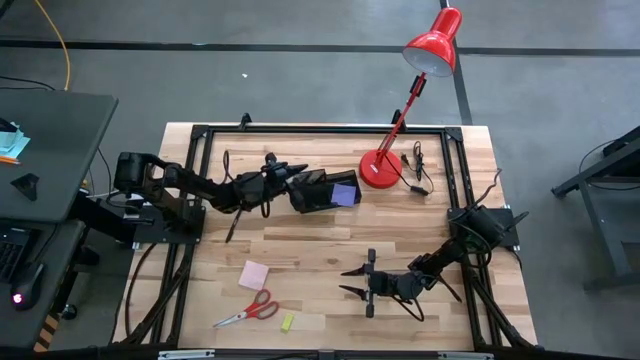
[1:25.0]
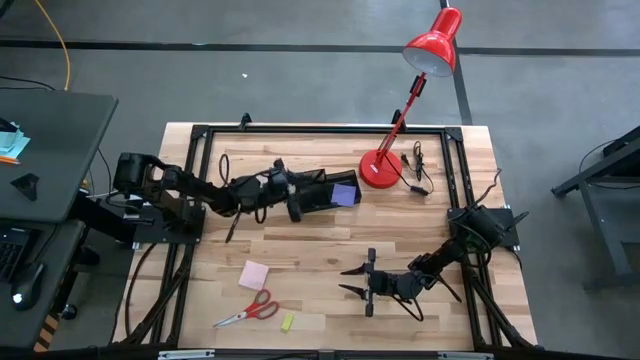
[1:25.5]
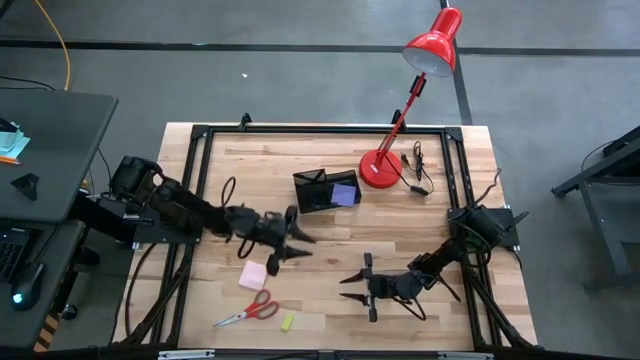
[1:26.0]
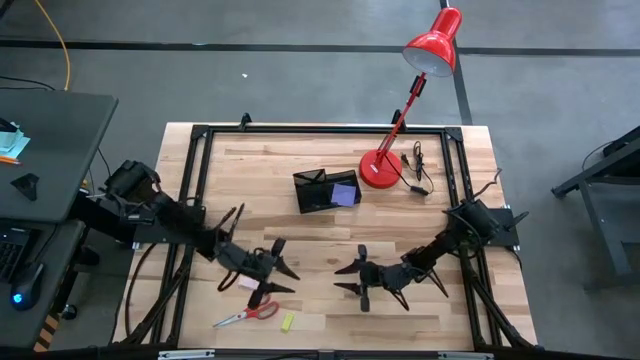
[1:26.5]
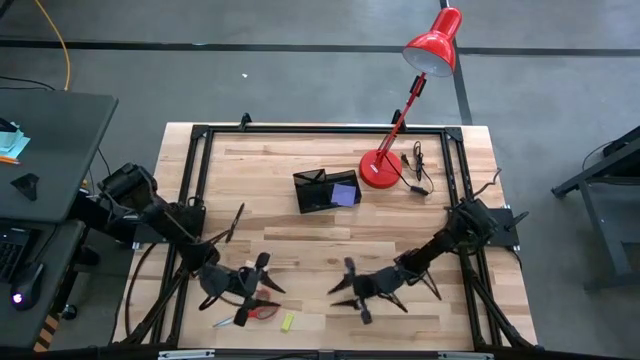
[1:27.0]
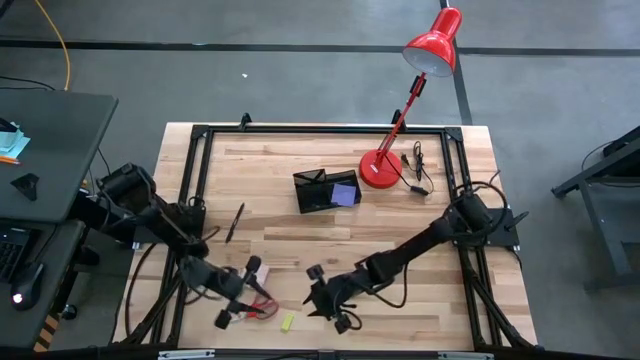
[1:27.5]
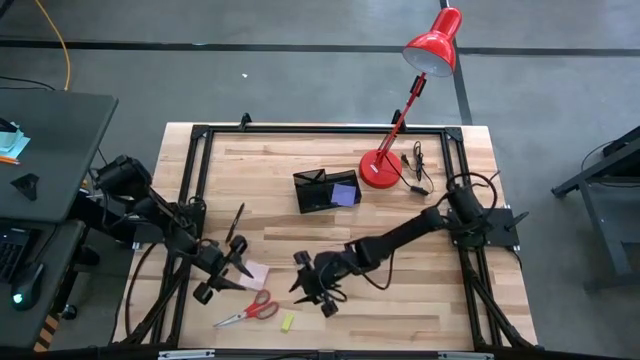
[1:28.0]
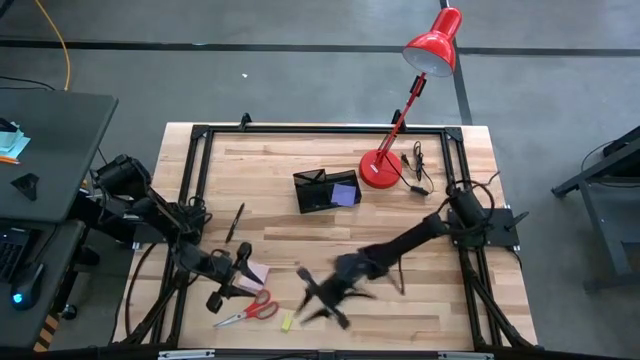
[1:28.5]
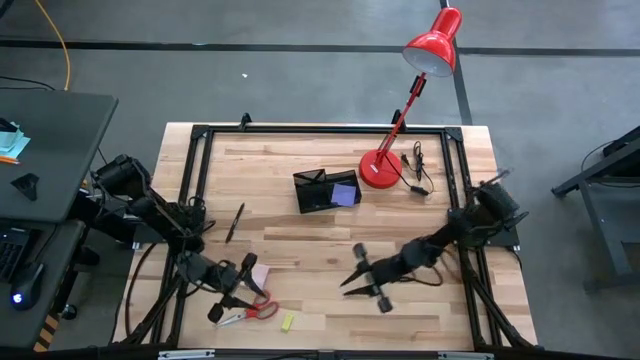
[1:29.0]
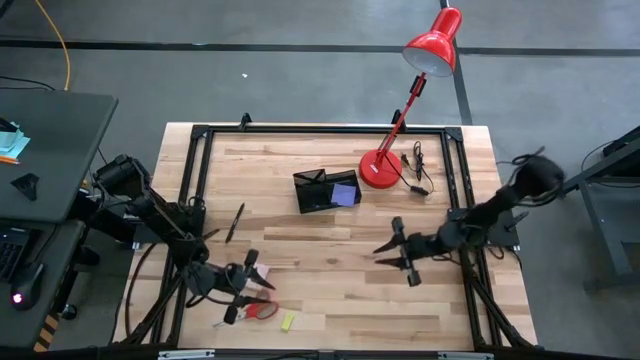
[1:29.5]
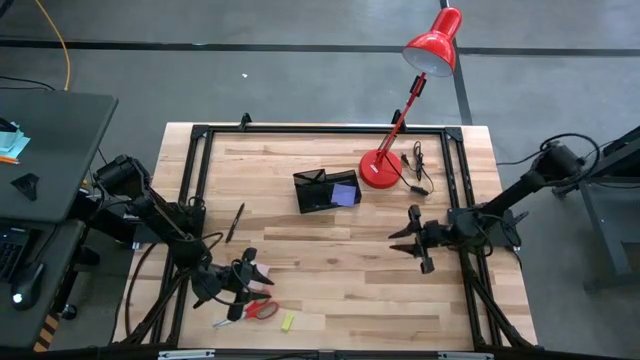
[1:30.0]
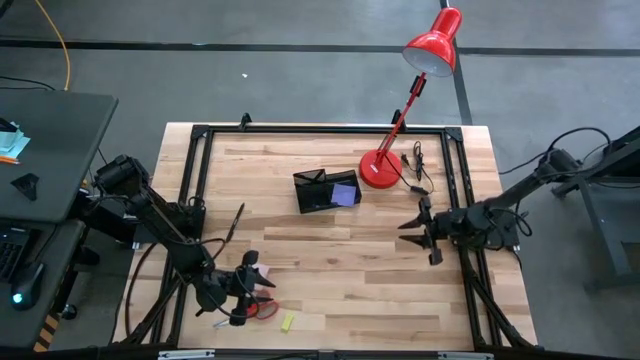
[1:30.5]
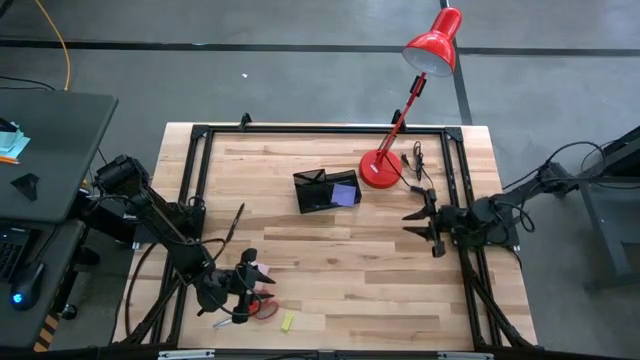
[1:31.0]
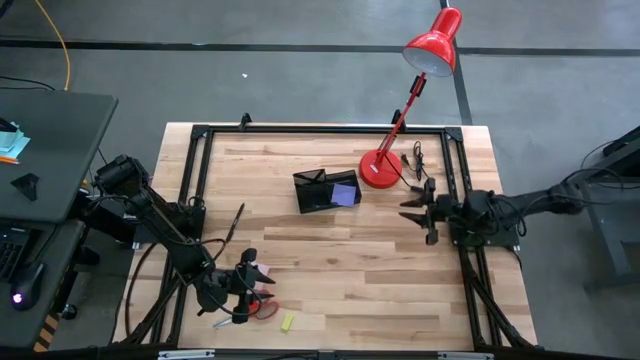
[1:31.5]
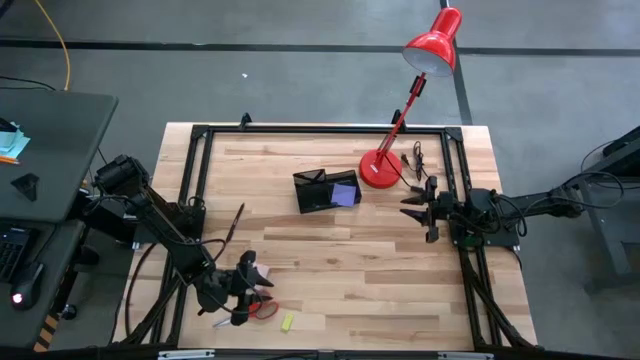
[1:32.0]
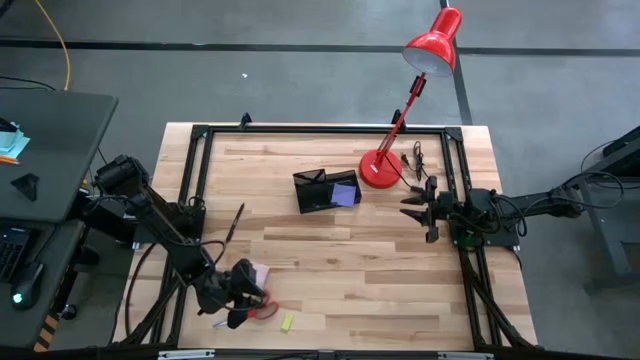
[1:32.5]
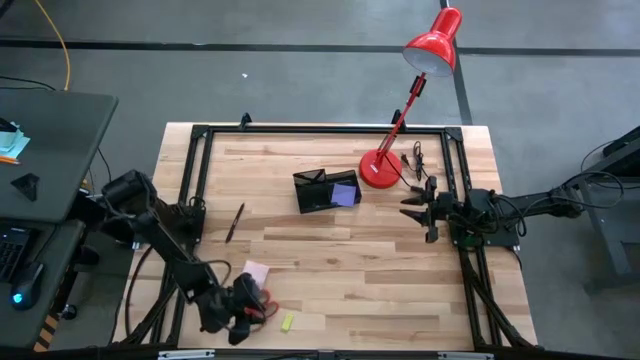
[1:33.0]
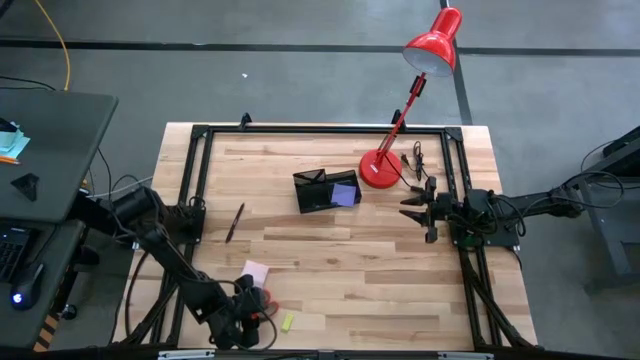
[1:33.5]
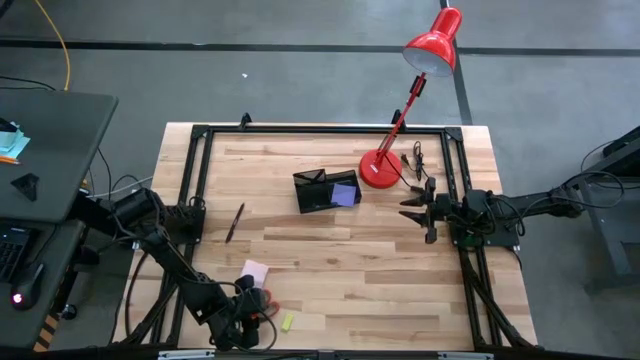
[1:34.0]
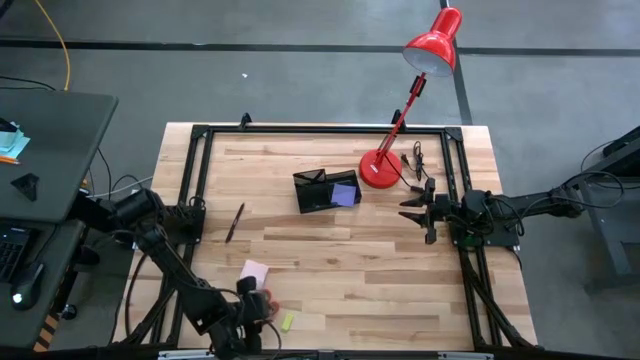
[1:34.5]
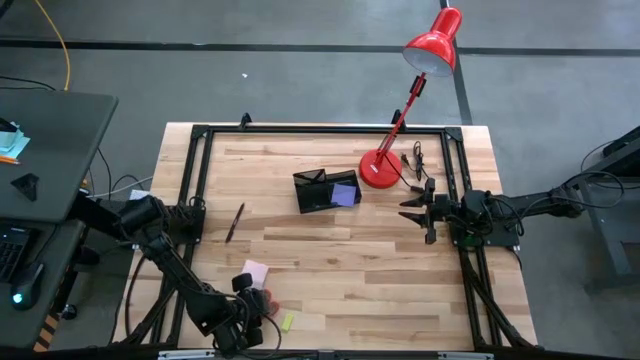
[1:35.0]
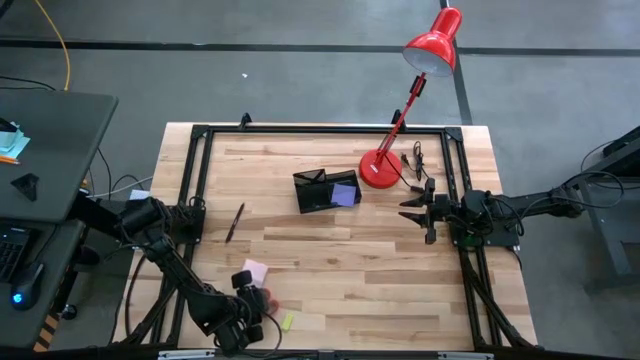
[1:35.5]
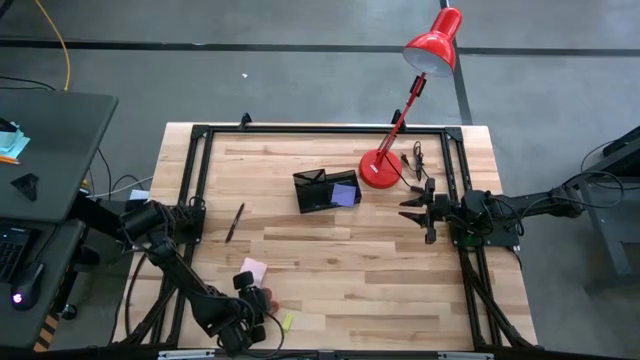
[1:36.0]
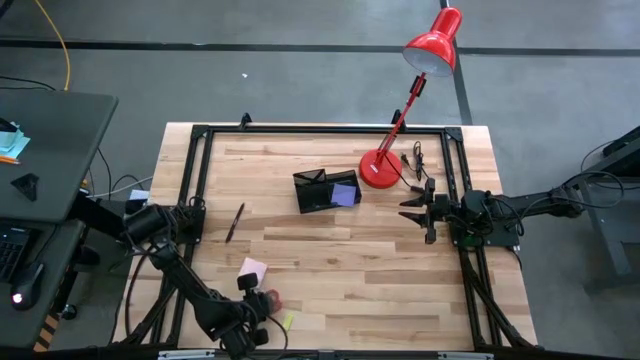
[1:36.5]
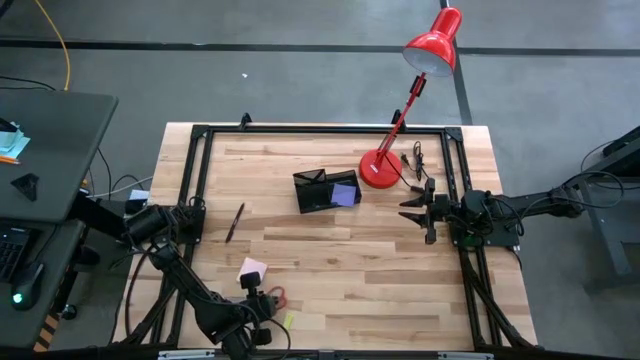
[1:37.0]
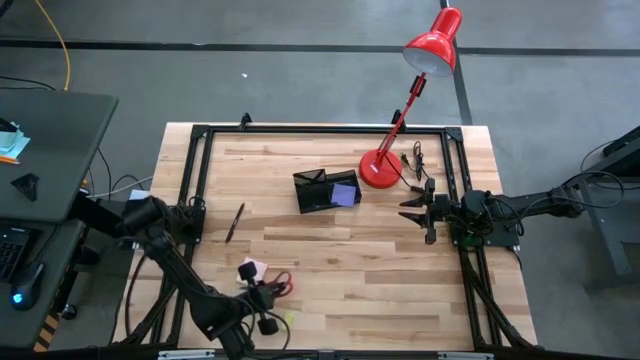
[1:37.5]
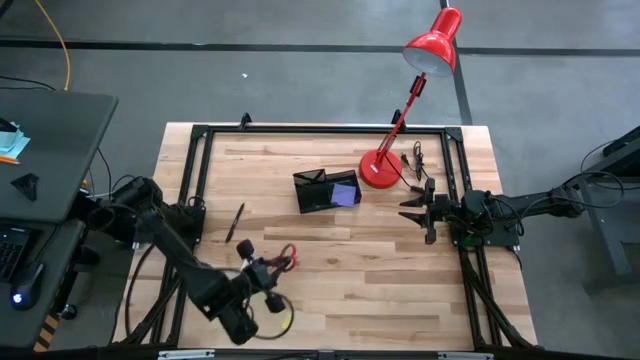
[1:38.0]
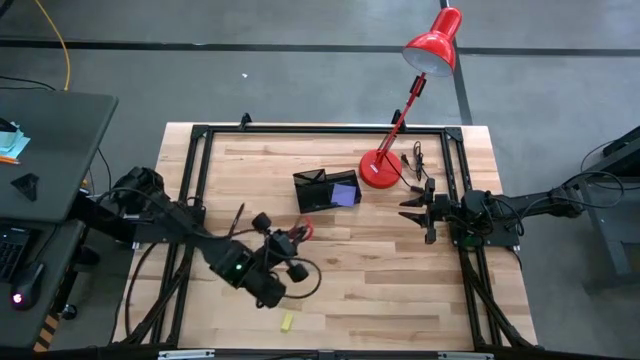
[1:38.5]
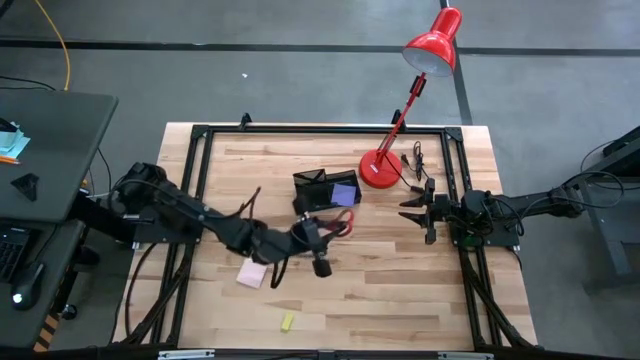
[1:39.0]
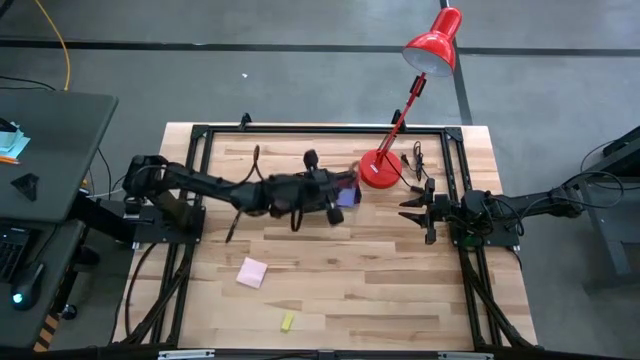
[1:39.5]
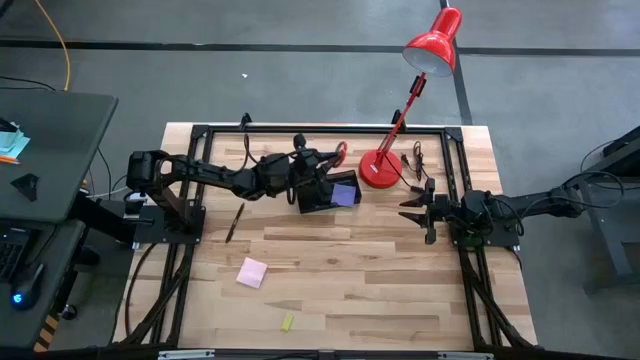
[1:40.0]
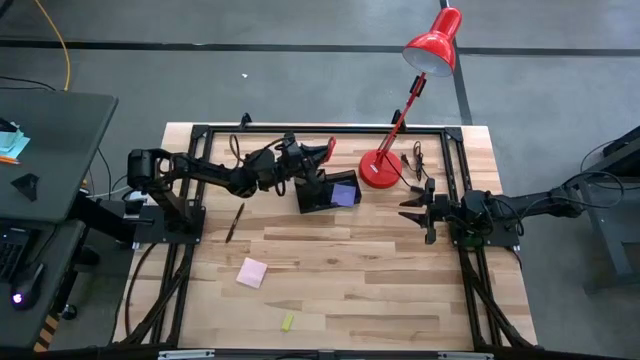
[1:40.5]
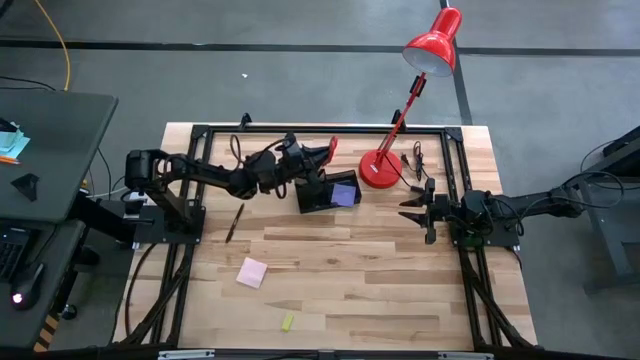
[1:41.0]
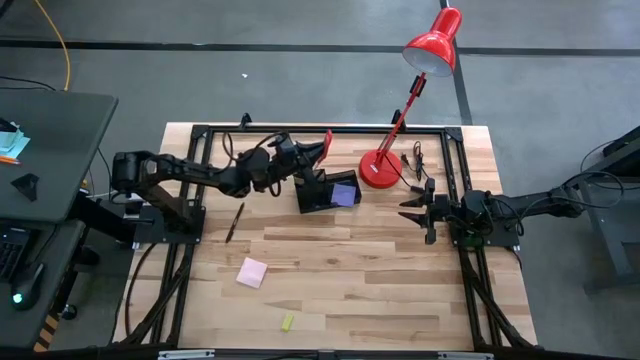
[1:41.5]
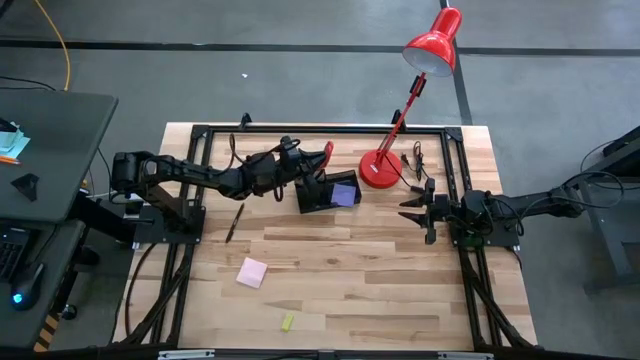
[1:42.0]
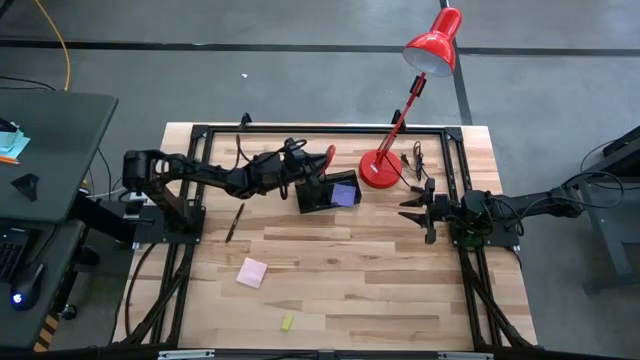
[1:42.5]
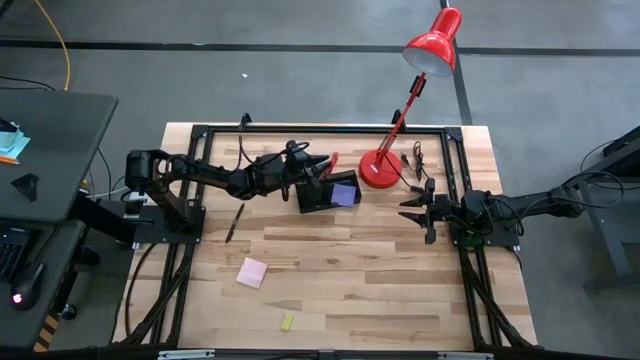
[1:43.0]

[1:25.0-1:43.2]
Task: Pick and place office supplies into organizer
Put the red scissors into the black desk organizer

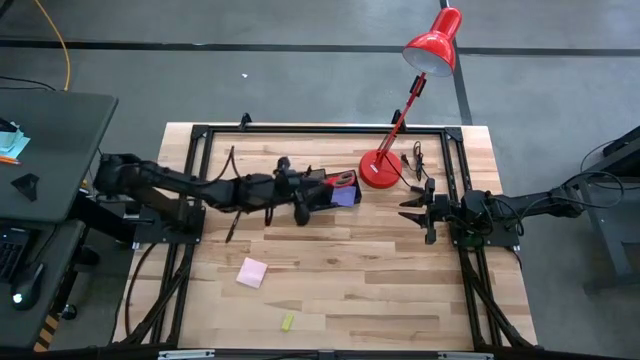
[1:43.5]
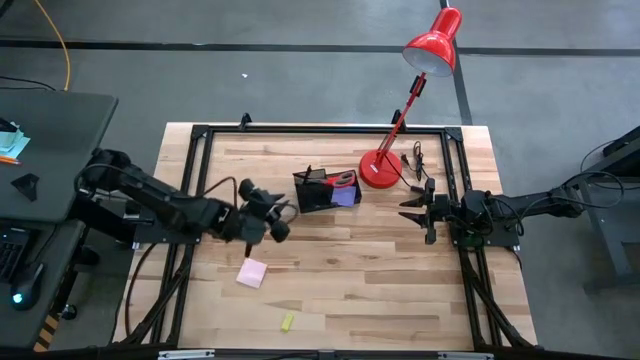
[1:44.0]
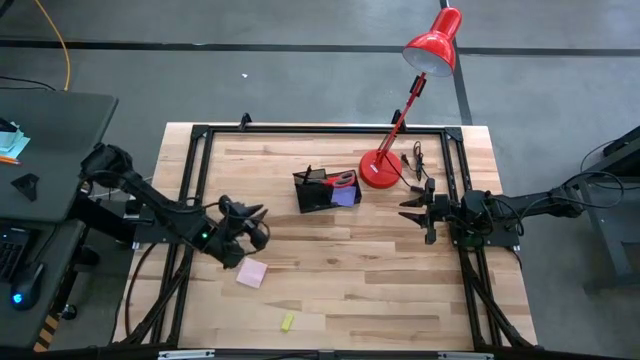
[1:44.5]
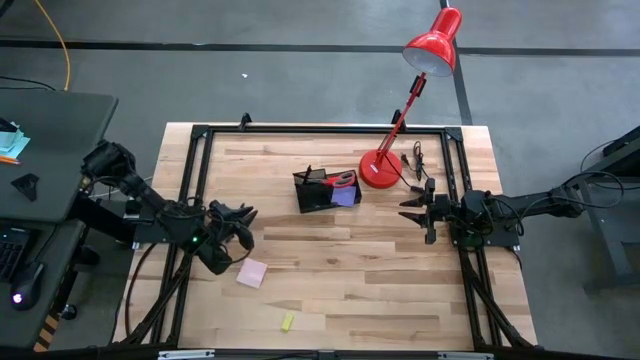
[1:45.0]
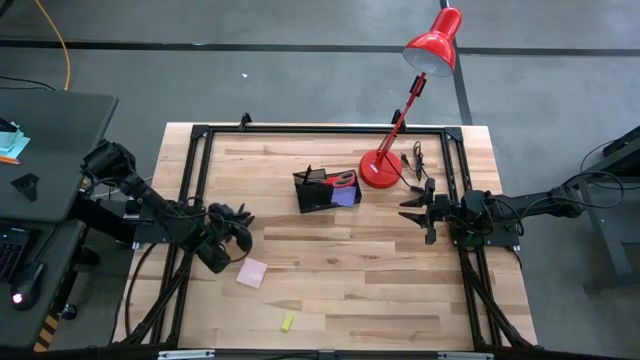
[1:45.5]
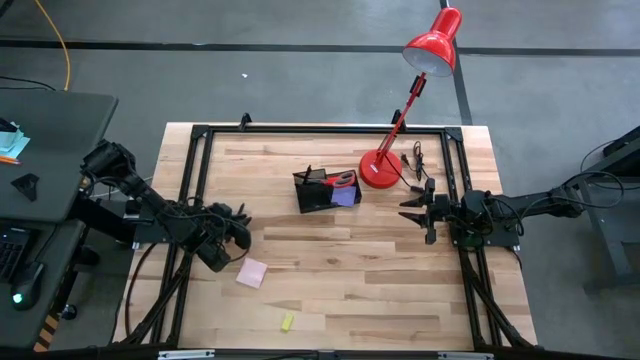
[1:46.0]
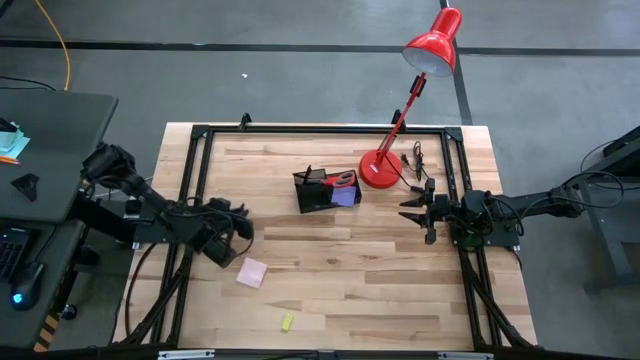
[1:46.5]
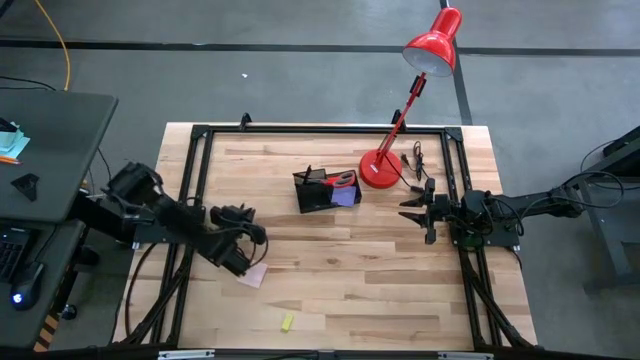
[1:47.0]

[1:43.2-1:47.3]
Put the black pen into the black desk organizer
